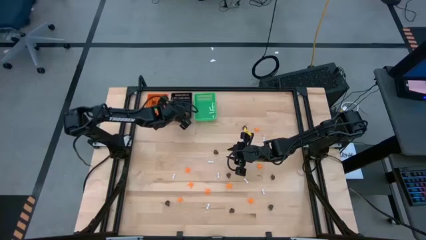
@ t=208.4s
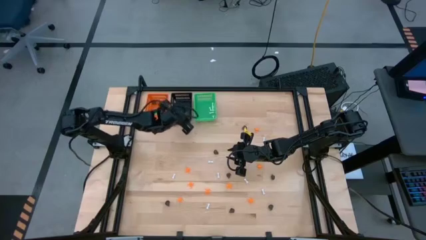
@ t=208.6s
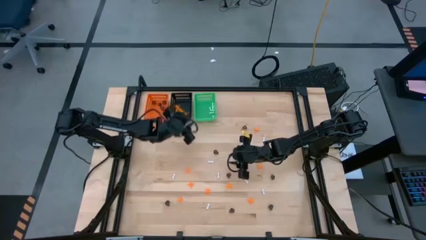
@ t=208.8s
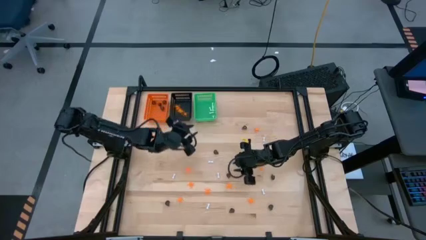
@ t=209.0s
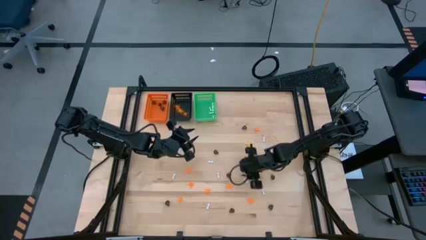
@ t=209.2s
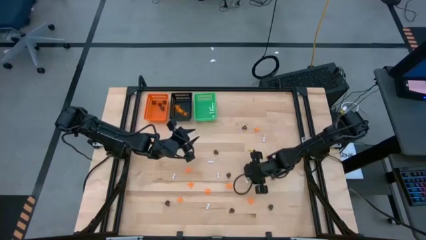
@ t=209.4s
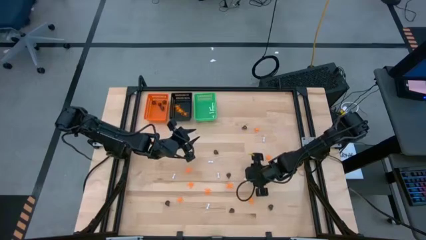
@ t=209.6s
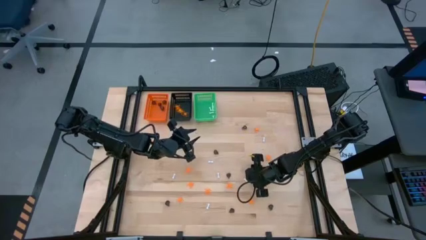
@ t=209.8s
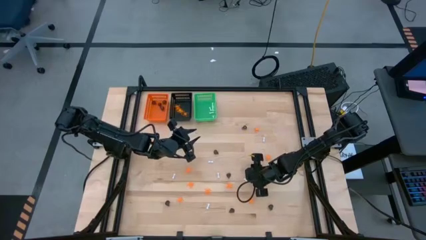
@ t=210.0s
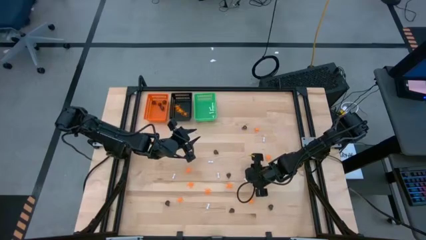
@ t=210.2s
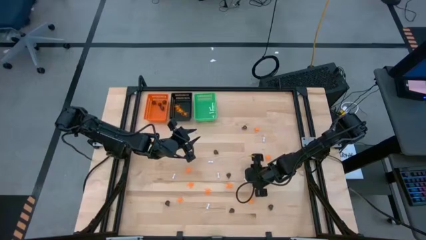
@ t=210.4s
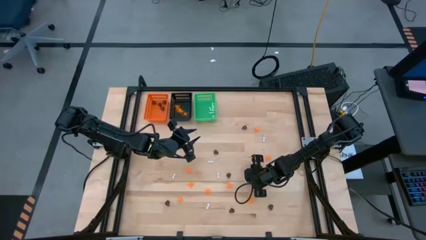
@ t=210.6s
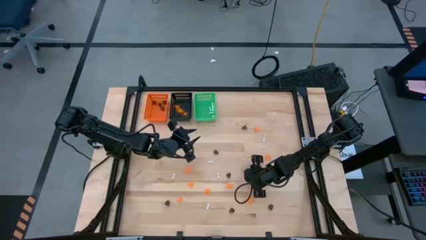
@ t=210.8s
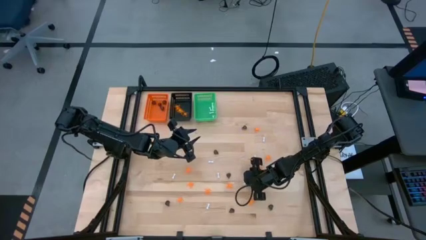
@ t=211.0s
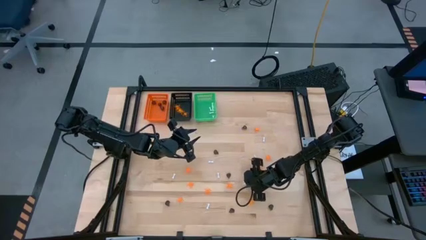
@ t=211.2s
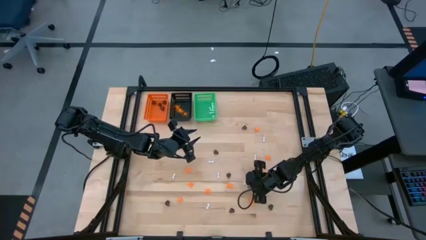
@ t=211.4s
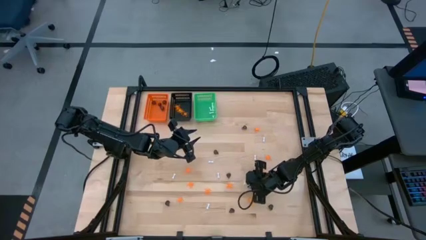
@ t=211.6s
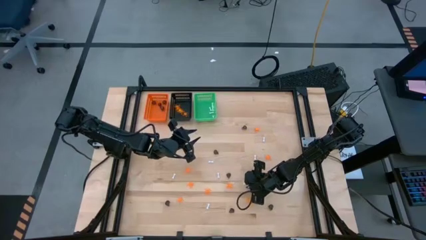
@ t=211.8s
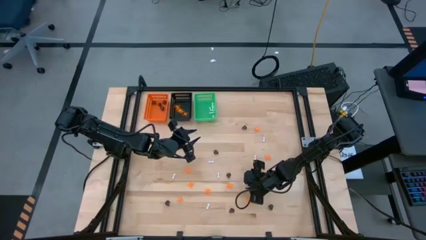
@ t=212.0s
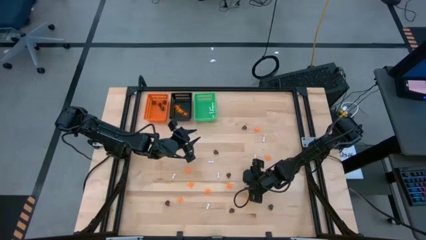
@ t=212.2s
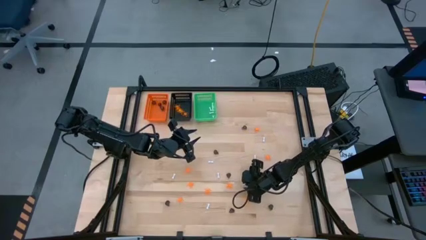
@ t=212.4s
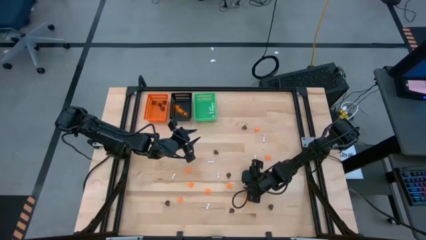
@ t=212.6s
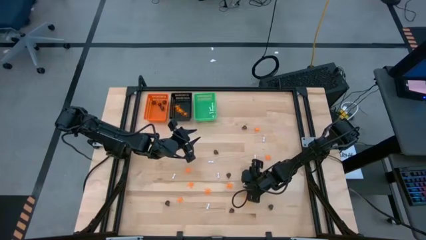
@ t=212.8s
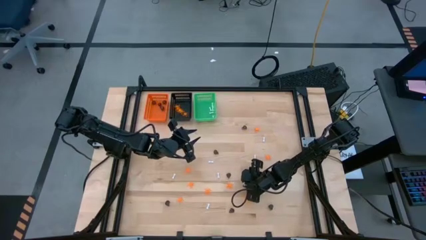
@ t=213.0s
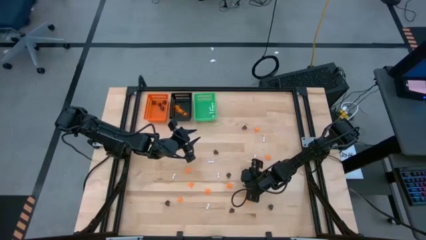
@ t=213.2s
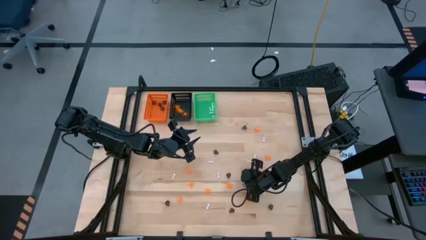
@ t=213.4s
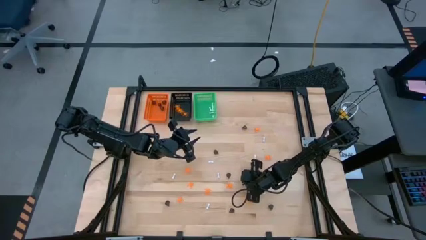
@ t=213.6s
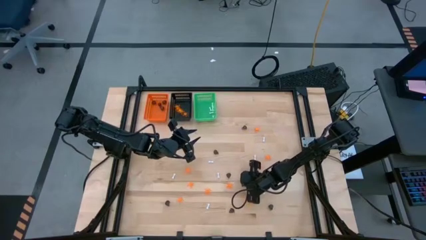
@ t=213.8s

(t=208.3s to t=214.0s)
Task: Sort Halloween decoration
Put the white bone toy into the green bin

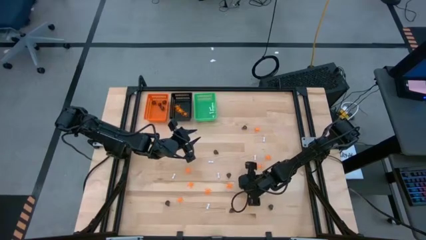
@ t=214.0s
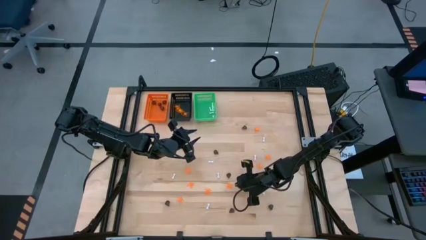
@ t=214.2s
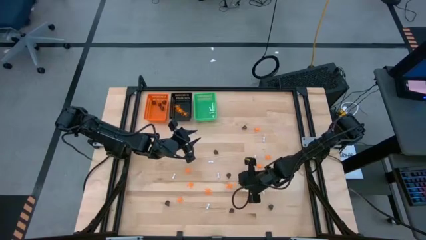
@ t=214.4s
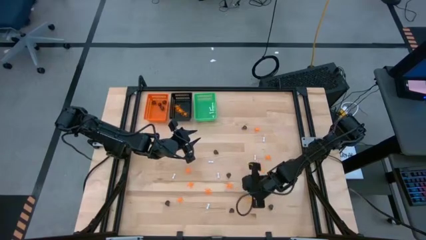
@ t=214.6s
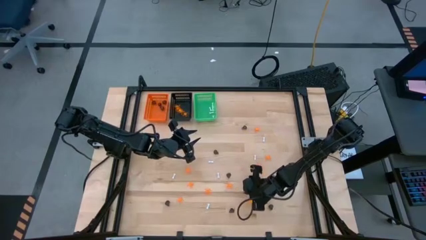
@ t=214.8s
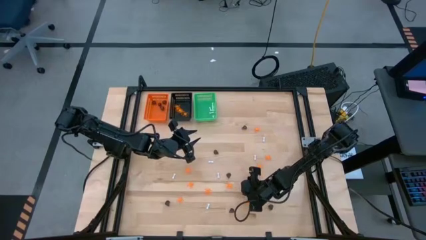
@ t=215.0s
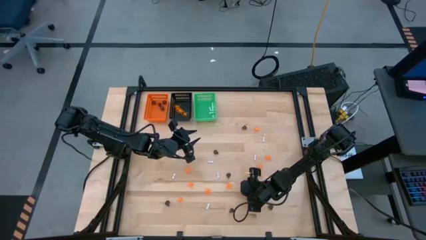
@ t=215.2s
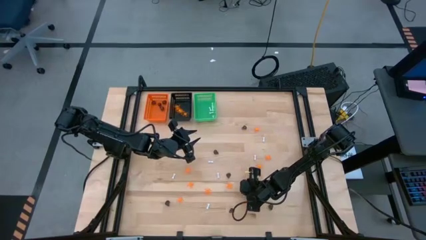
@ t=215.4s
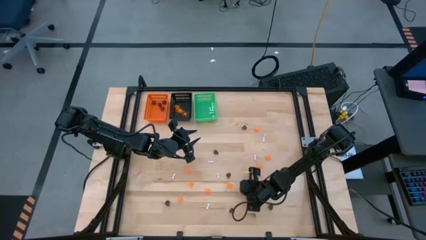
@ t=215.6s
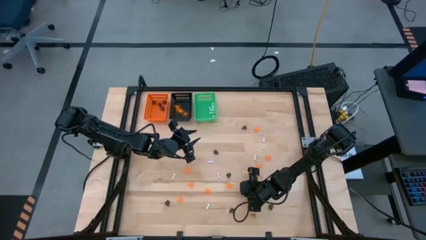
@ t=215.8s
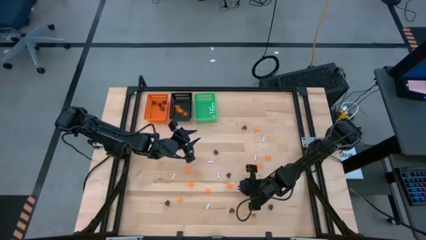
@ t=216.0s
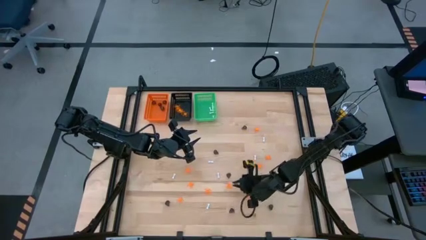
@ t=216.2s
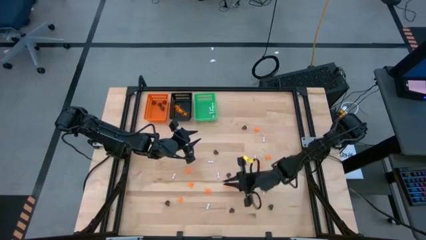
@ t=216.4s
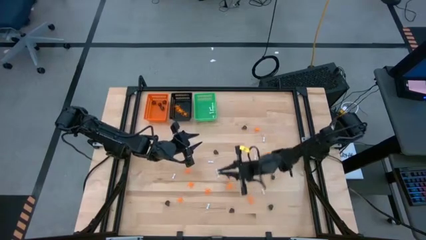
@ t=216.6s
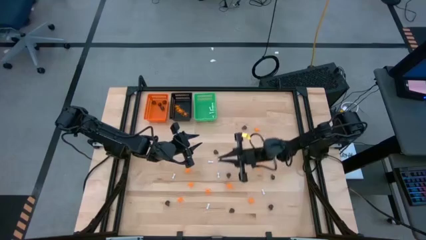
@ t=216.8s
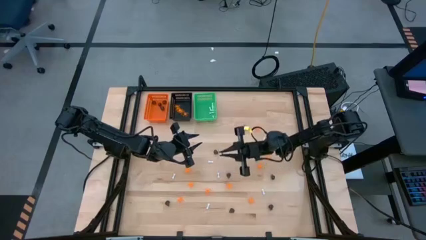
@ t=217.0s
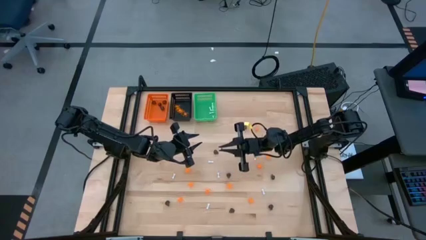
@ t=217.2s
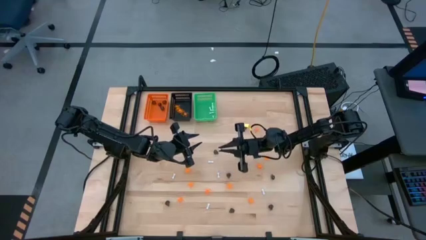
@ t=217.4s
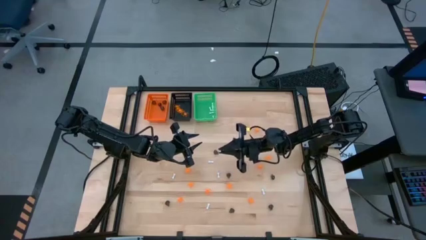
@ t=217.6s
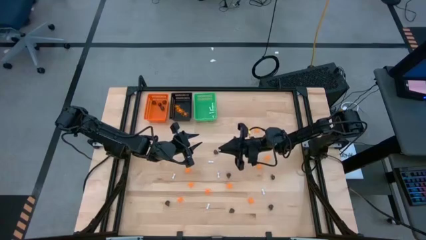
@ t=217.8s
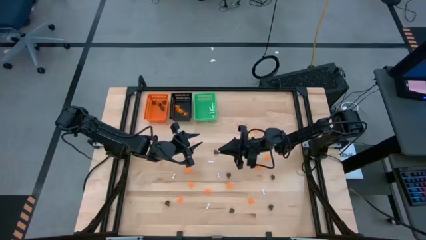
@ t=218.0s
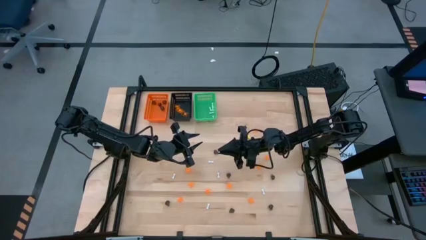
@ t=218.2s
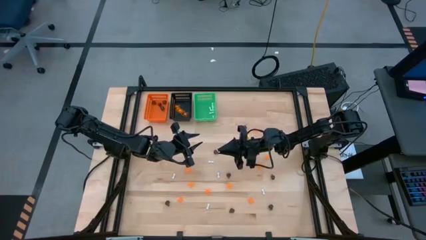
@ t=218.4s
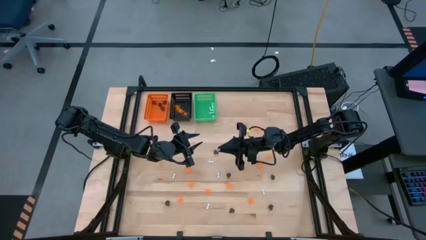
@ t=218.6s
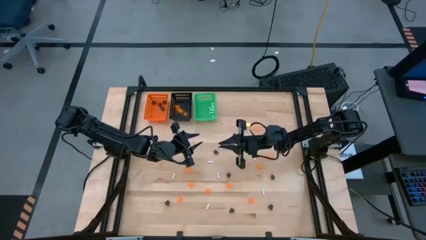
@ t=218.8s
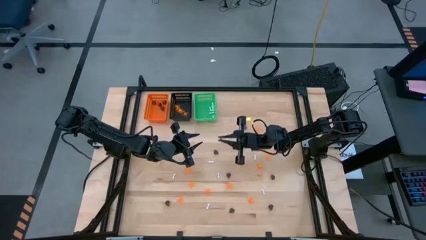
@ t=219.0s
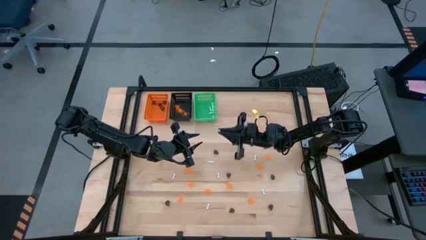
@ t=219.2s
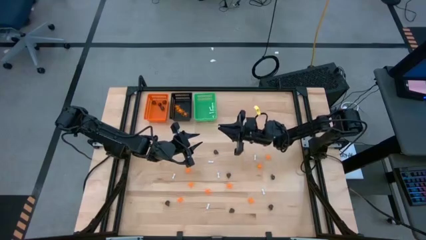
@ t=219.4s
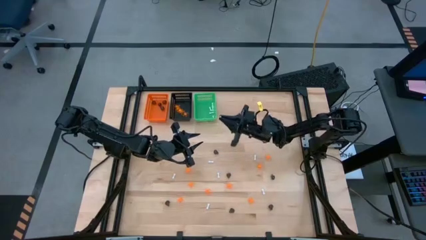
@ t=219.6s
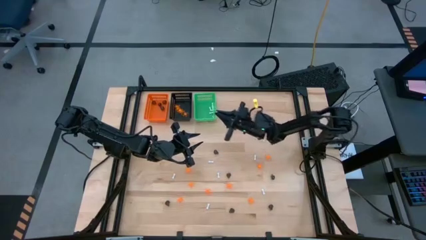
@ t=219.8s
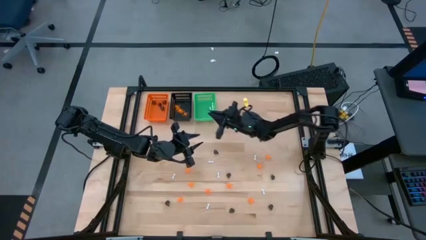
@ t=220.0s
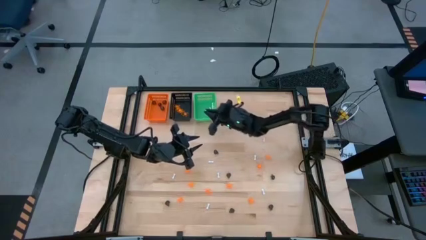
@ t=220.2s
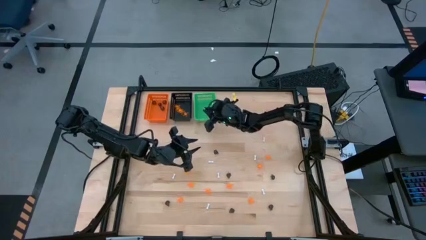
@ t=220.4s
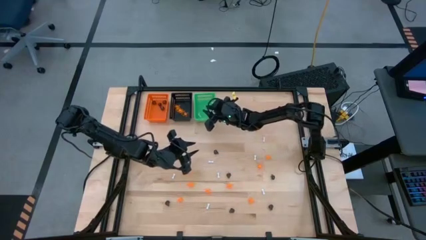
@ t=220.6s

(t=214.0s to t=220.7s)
Put the white bone toy into the green bin

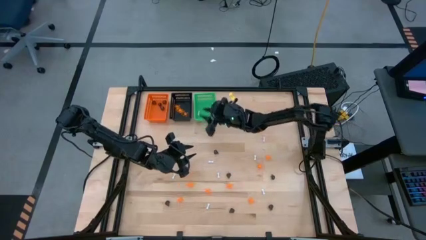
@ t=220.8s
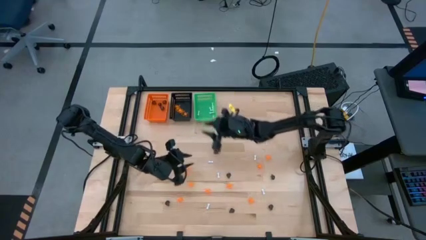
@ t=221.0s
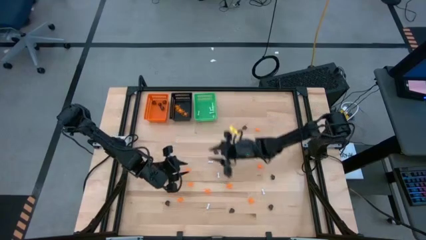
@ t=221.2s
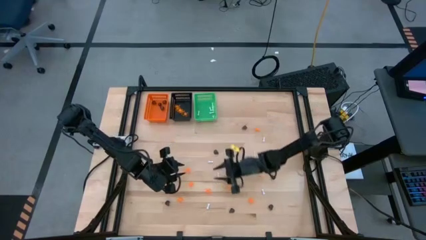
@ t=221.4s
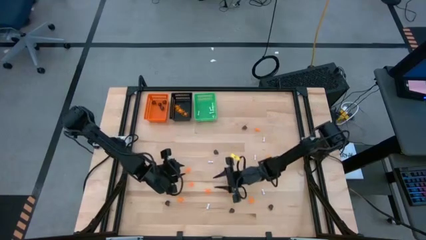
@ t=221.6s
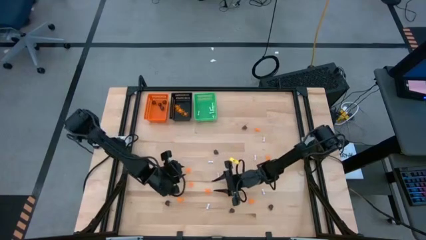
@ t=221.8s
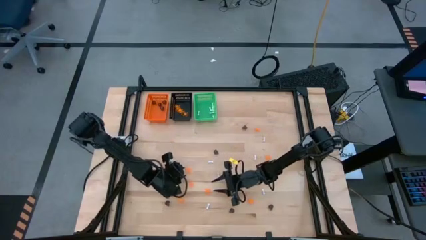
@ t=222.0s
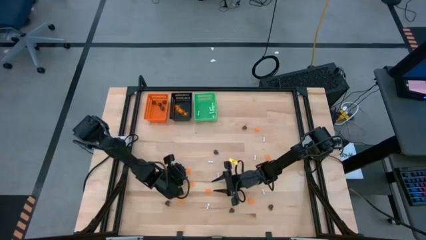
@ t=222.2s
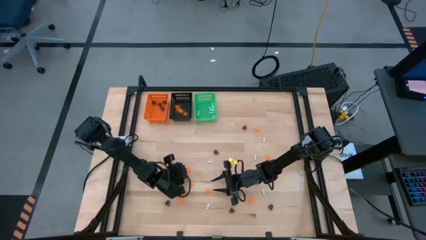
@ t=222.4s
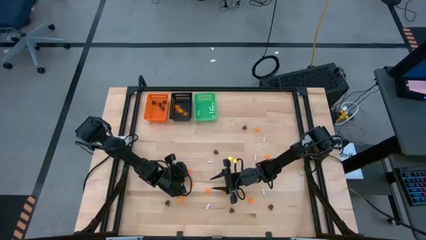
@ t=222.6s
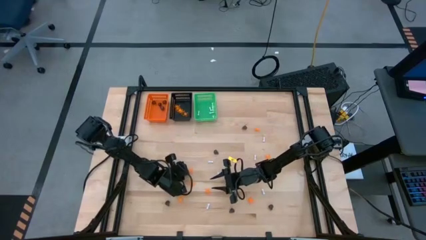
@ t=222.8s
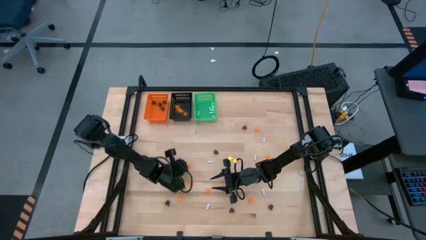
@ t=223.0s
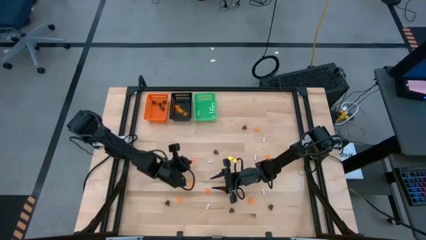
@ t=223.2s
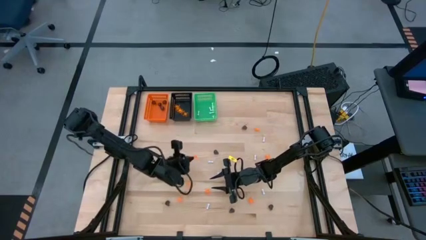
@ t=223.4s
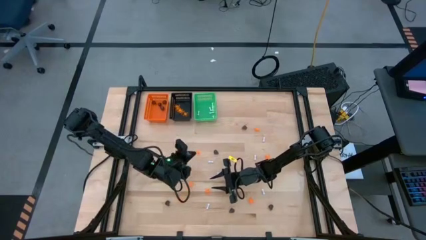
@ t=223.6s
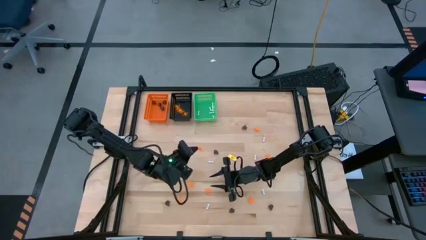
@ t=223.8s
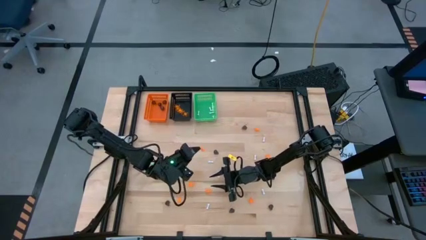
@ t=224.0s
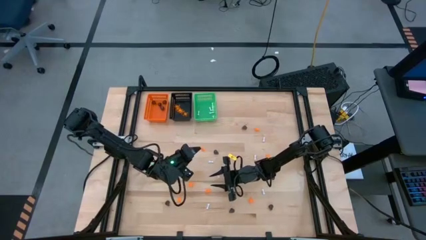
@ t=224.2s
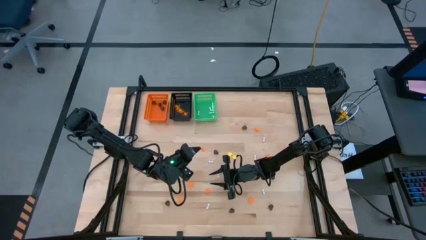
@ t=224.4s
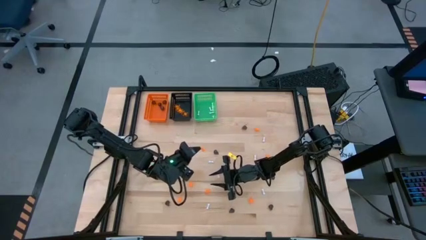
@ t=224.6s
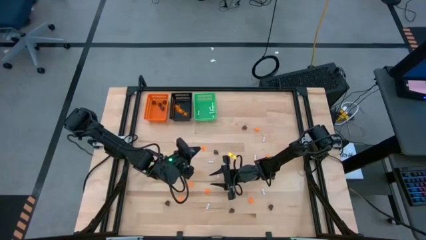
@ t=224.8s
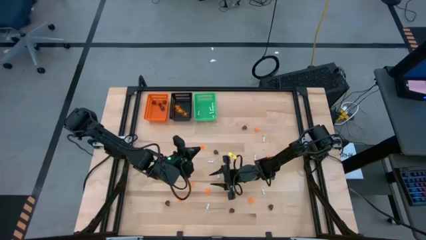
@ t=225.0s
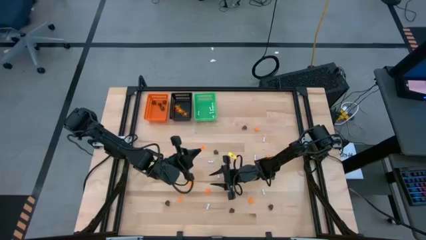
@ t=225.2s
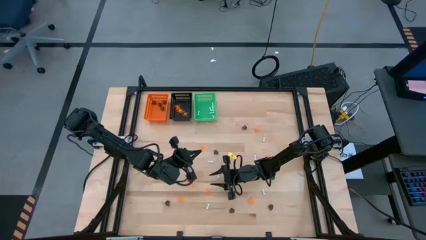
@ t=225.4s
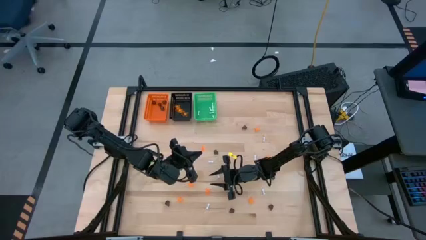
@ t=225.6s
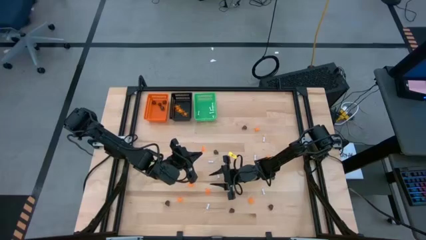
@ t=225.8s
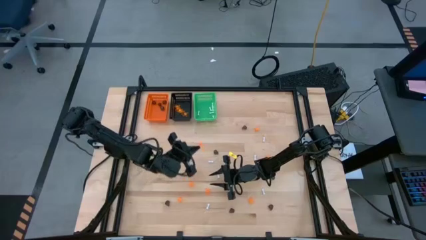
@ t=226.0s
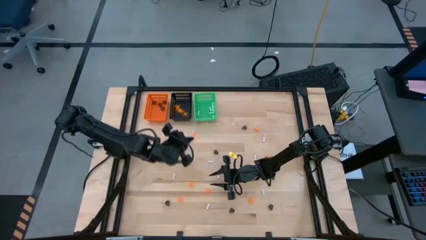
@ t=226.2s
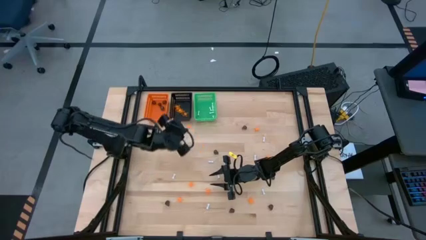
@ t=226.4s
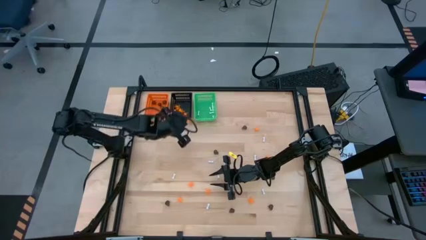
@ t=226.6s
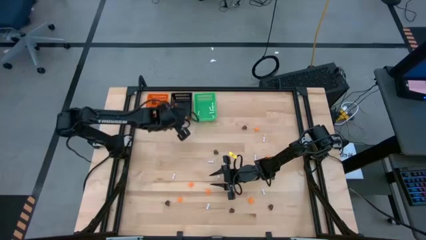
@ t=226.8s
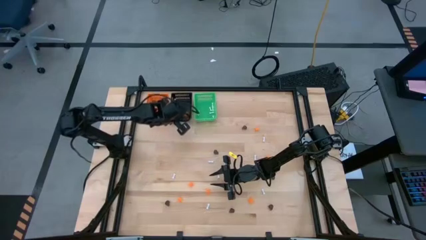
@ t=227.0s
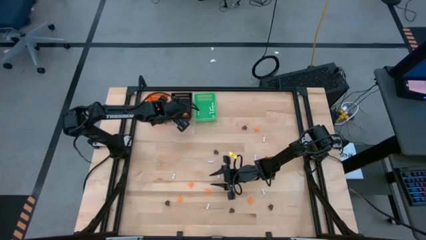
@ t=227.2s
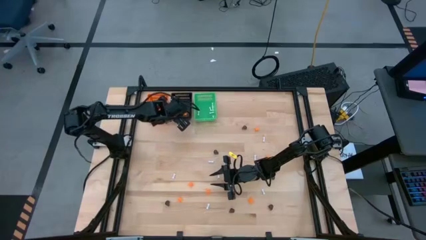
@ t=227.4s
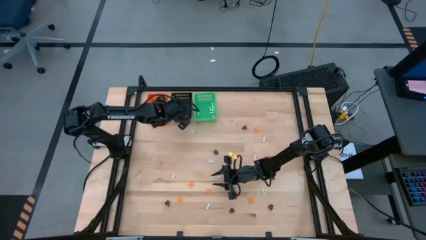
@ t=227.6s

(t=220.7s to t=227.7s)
Put the orange spider toy into the black bin
